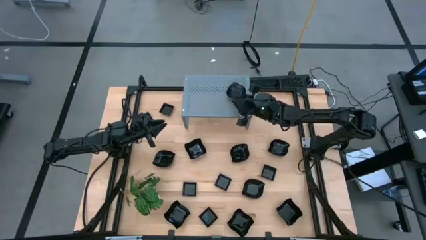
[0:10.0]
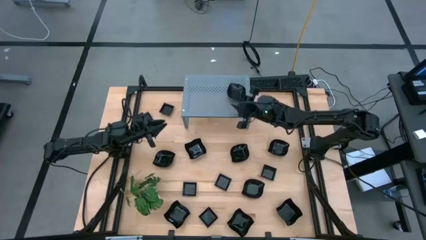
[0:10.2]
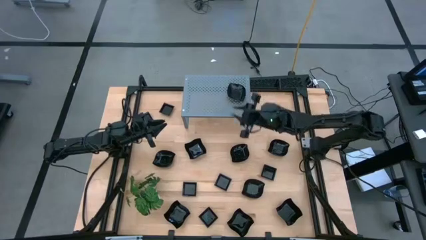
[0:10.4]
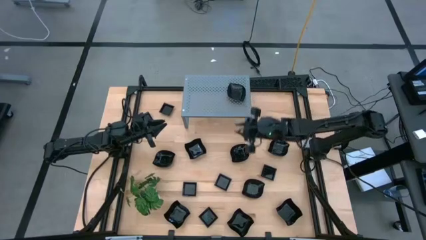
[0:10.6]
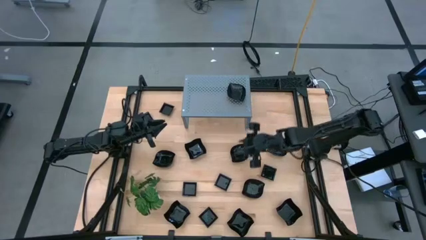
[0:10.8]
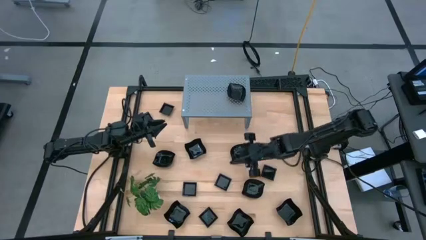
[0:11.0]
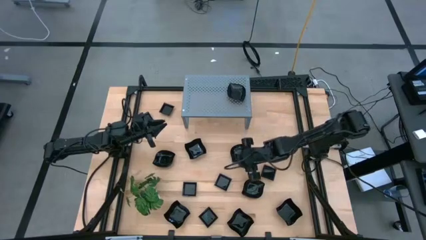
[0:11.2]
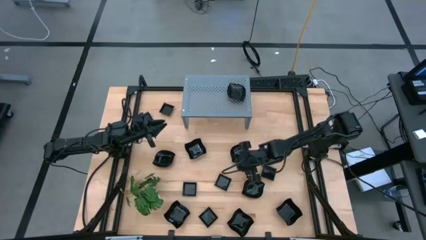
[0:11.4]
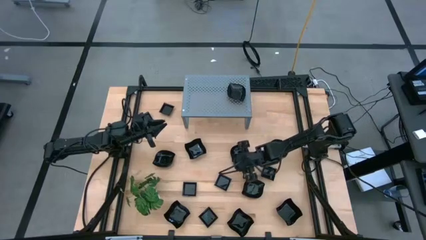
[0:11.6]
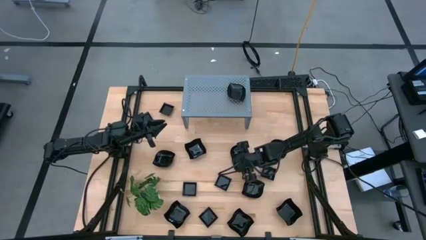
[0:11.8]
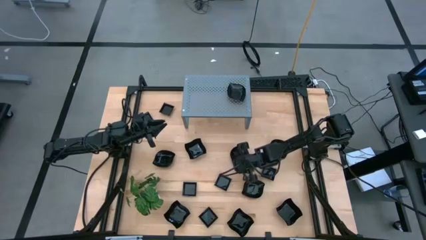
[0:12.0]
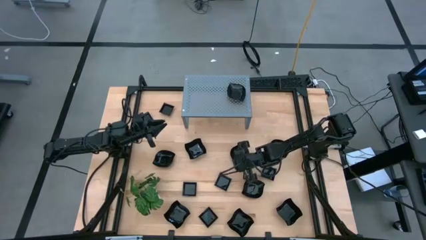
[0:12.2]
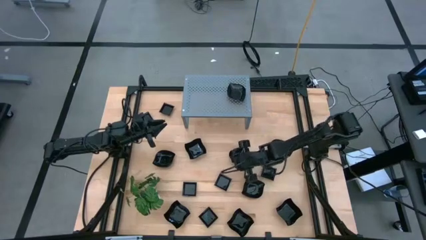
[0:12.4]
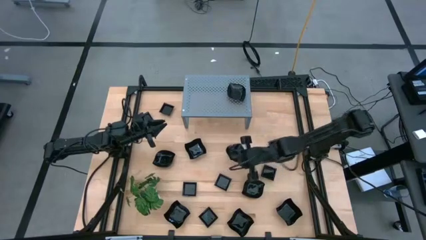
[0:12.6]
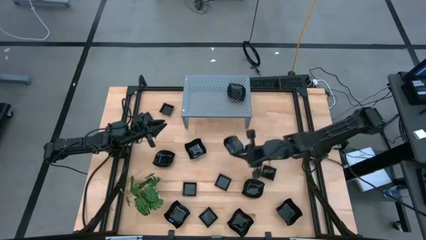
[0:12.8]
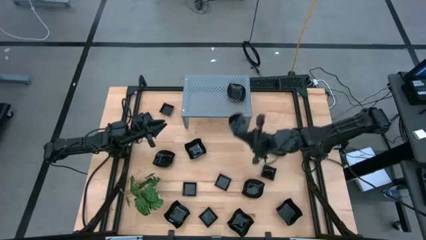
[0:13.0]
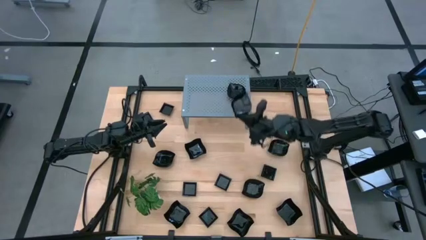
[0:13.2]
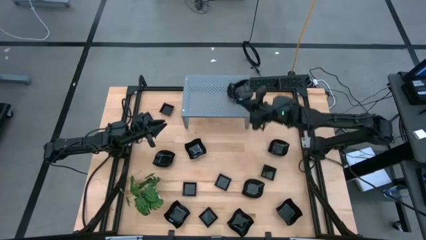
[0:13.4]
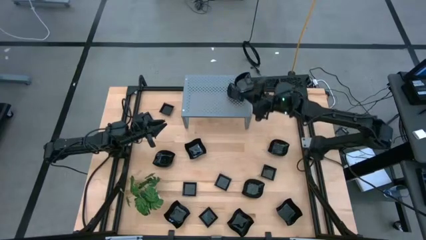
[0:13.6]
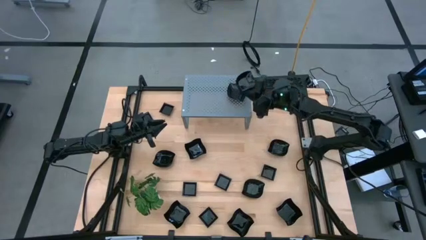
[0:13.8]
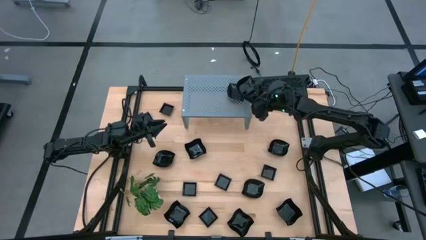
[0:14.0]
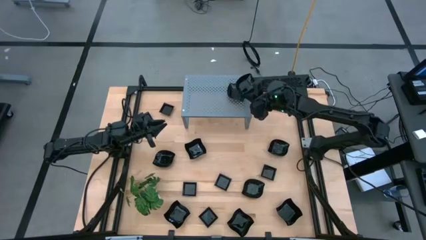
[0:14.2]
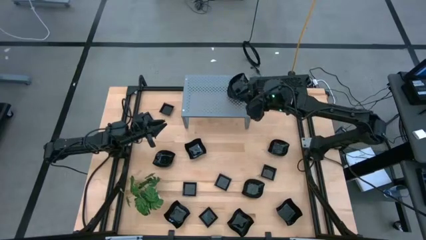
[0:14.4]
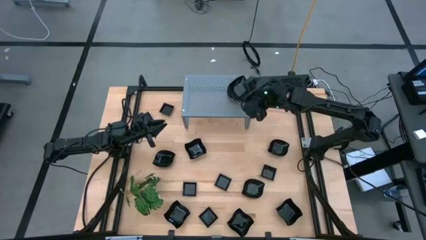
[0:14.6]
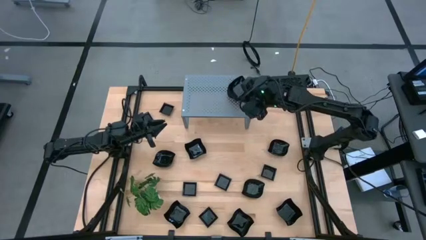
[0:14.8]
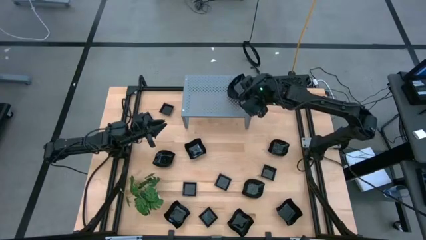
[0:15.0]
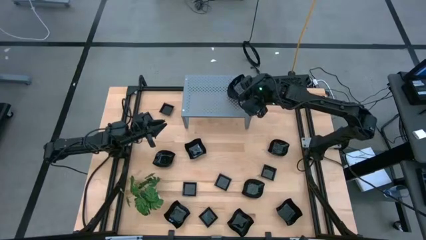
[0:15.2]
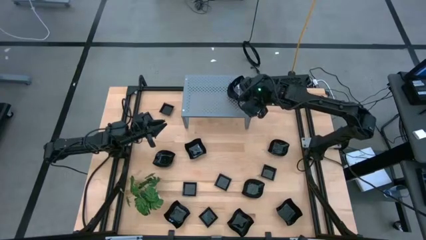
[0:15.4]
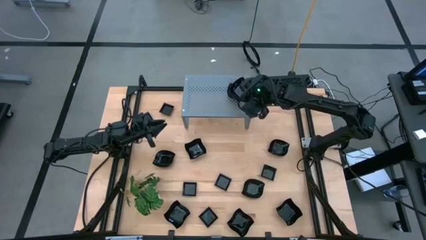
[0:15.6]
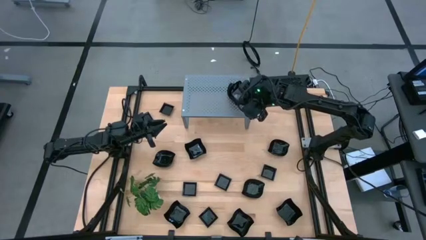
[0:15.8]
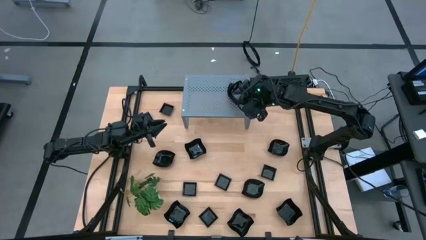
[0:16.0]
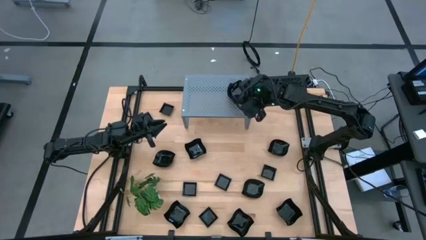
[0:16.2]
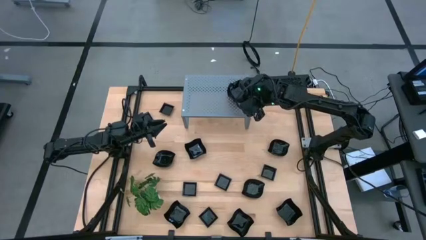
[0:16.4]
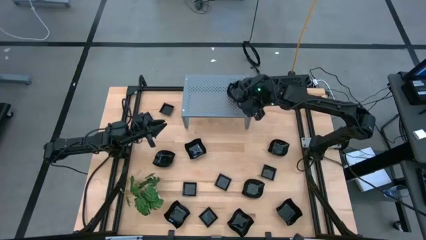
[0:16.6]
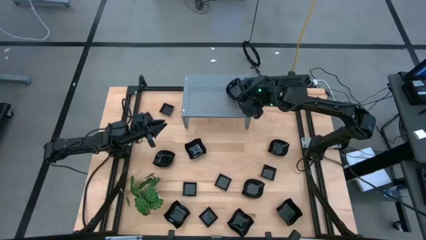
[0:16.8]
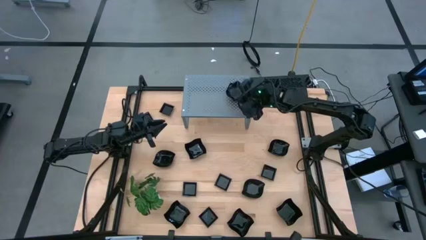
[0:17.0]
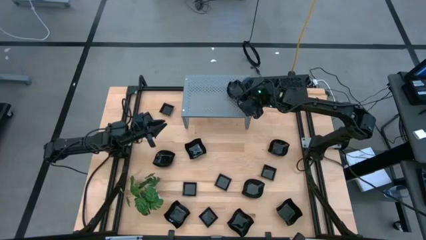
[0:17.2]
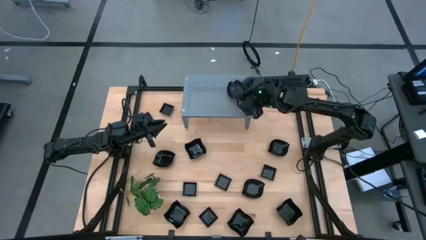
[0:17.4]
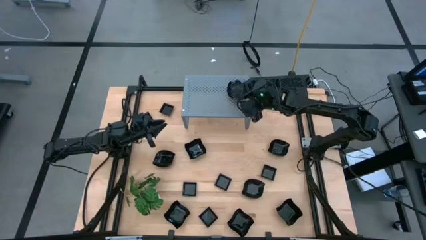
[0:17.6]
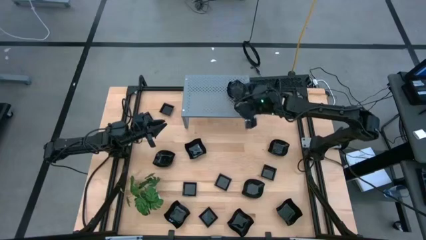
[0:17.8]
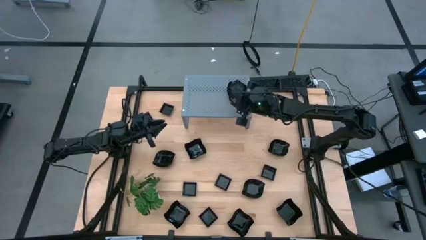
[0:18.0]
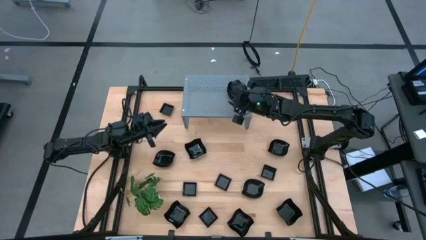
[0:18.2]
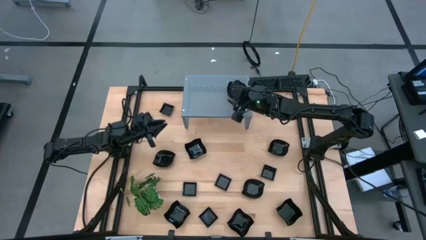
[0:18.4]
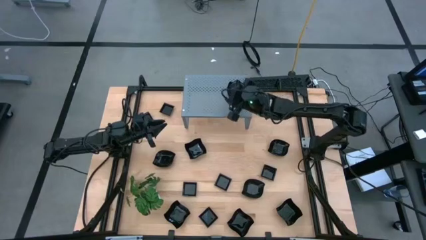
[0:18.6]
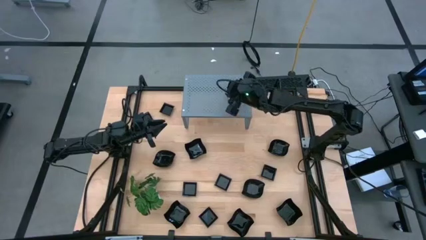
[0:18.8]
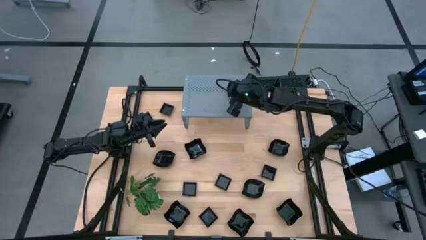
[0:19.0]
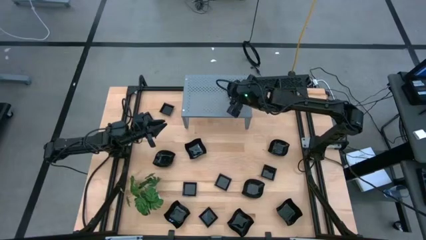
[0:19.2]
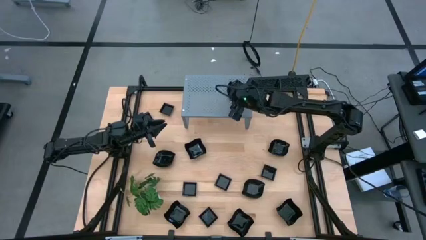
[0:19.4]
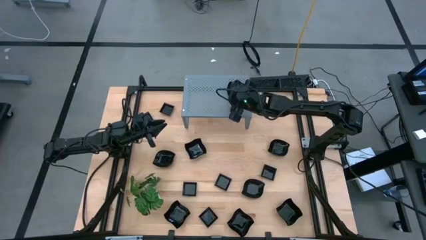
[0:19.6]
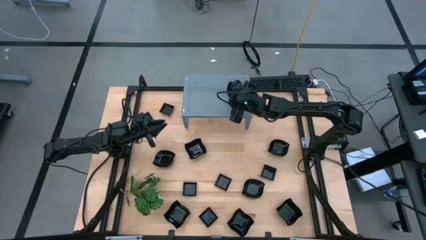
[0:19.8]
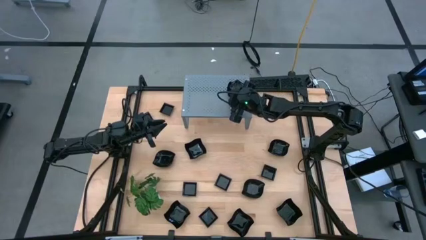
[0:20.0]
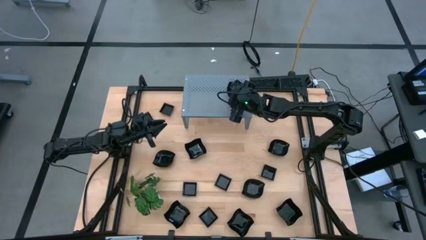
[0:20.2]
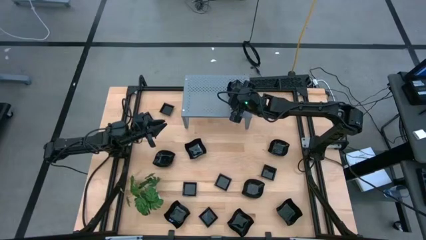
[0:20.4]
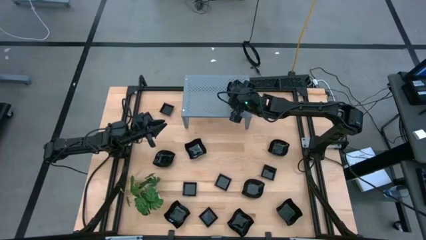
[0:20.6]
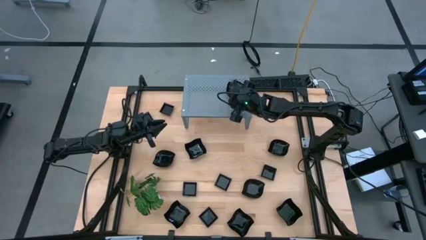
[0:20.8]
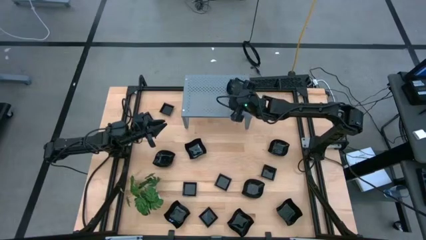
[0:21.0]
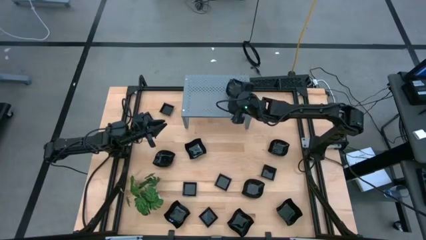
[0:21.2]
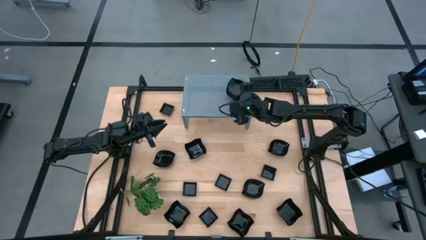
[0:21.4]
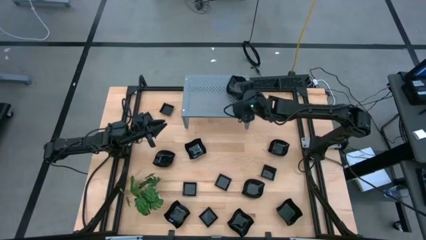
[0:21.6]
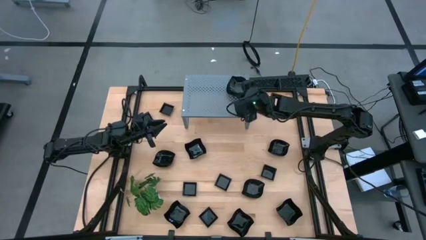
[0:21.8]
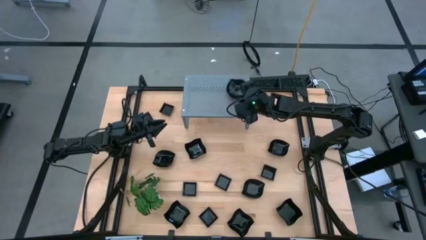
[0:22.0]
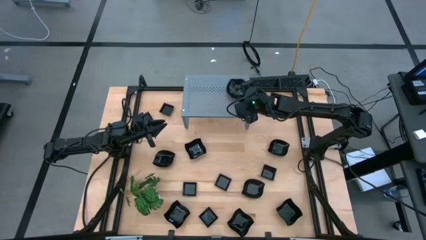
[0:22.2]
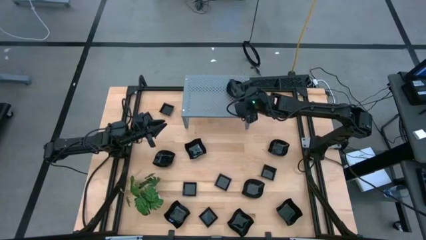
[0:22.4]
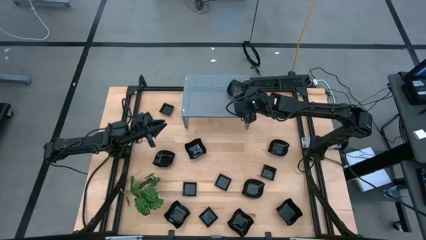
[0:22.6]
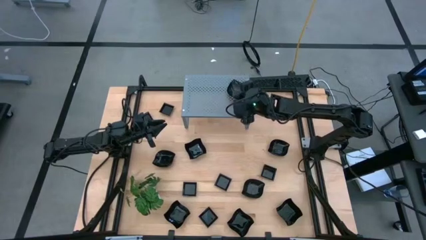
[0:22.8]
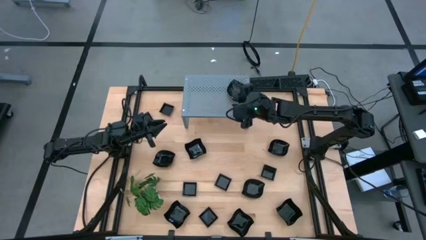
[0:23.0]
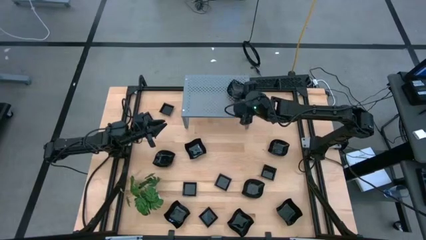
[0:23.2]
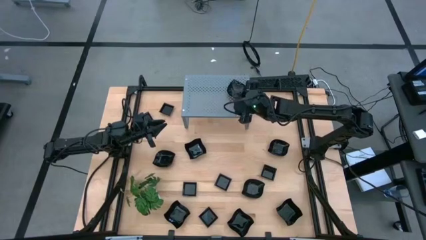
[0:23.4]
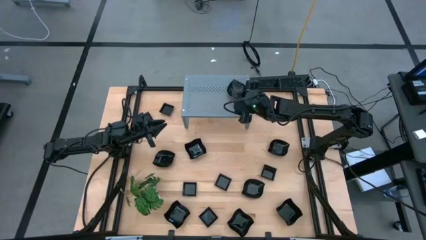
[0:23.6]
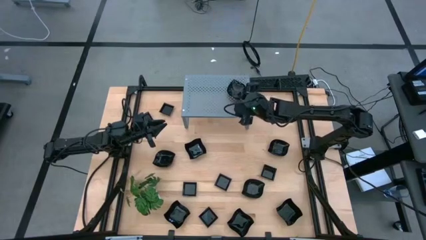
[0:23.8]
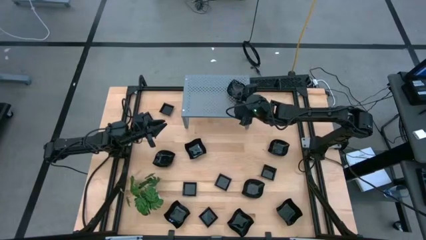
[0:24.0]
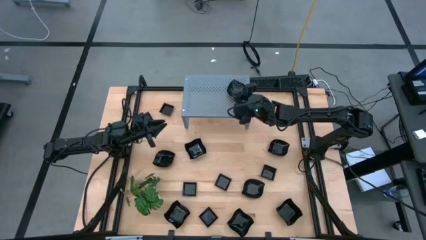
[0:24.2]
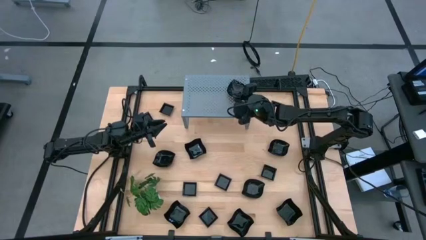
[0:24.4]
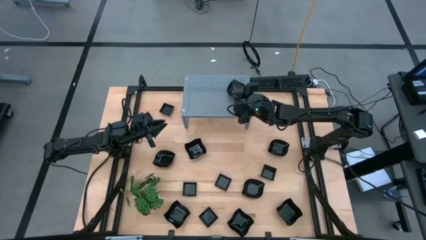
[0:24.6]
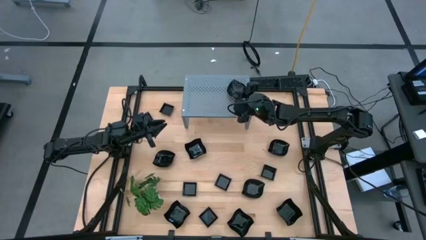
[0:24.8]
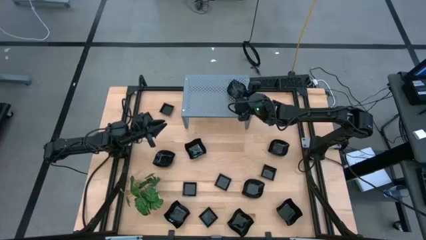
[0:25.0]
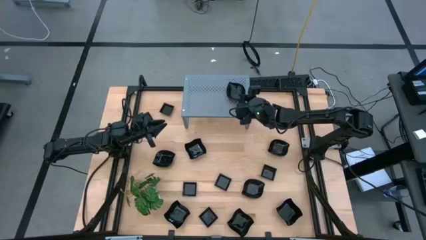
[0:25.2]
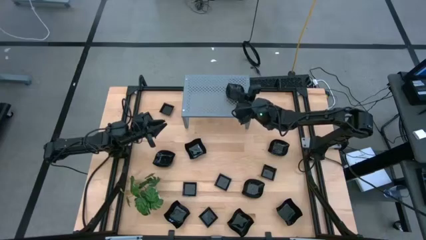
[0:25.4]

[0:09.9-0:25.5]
Task: Pick & Place Mini shaped plates
Stack the black leaf shaped plate on top of the black leaf shaped plate on the shelf
